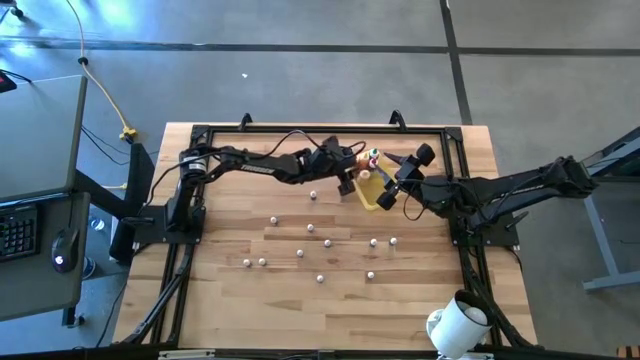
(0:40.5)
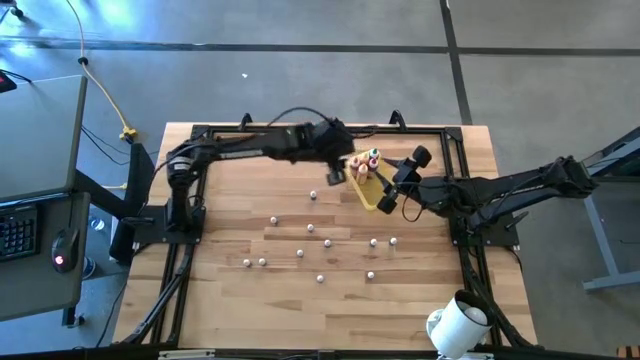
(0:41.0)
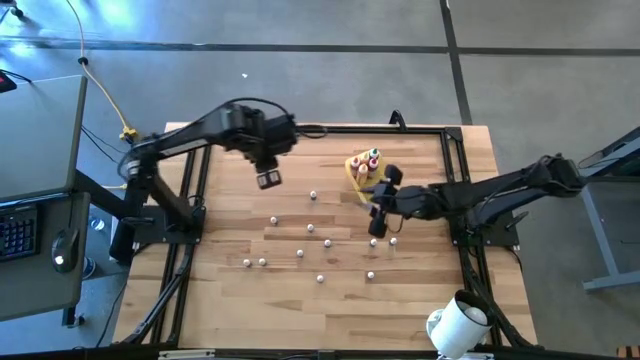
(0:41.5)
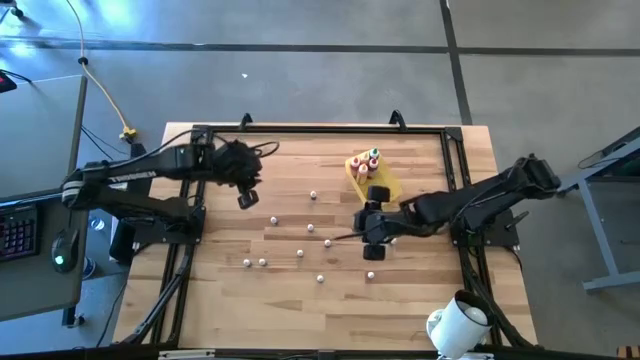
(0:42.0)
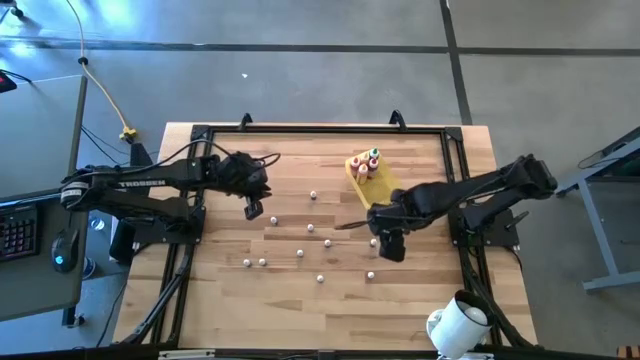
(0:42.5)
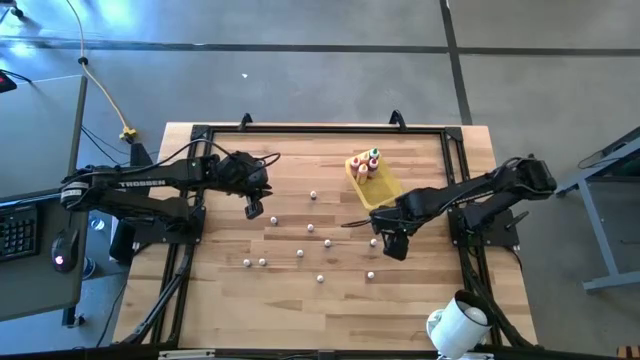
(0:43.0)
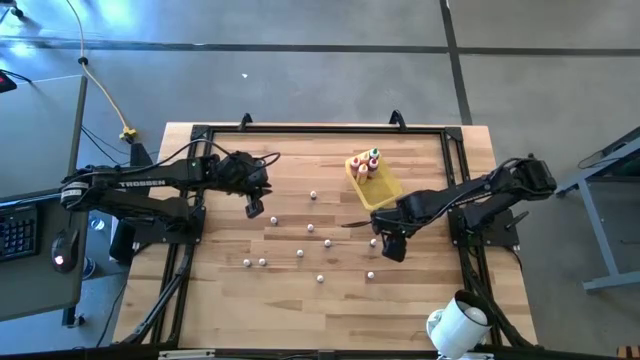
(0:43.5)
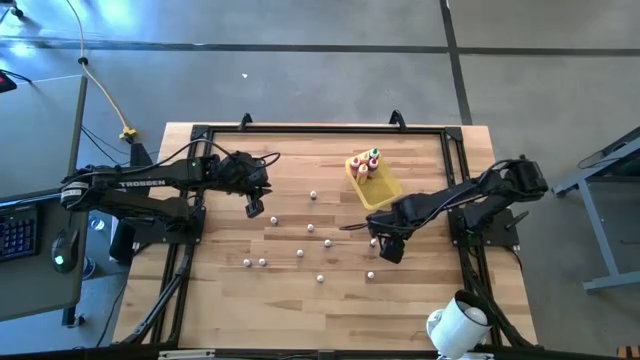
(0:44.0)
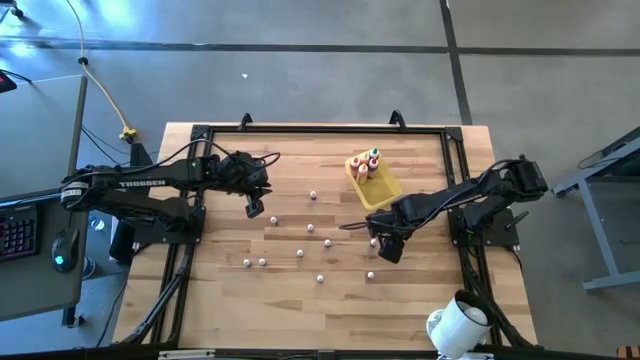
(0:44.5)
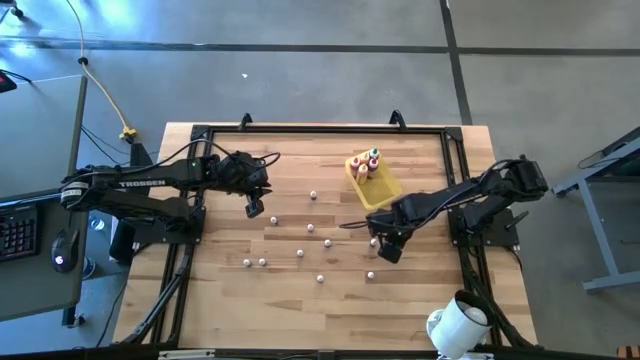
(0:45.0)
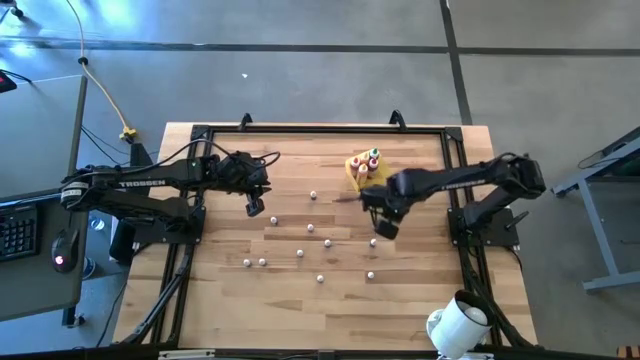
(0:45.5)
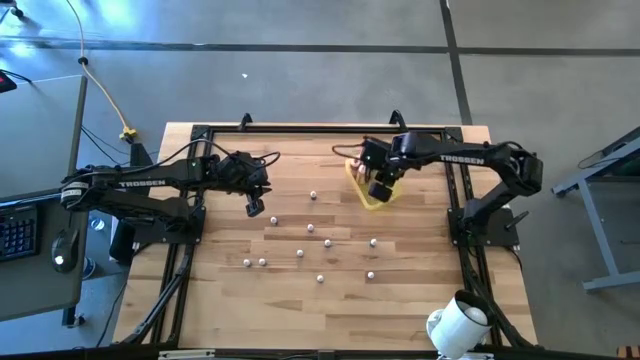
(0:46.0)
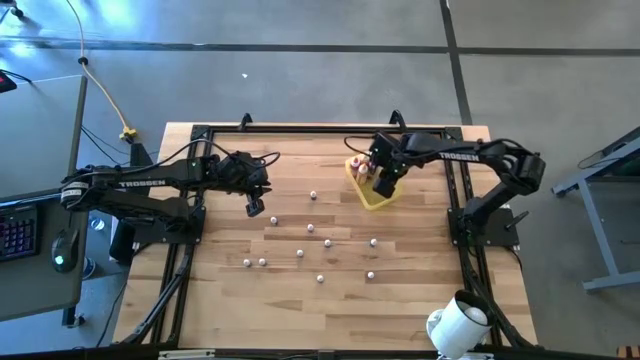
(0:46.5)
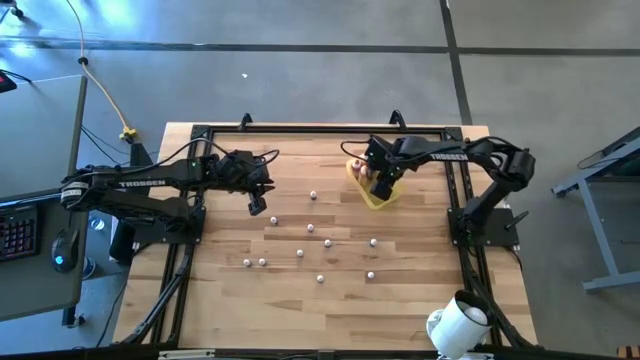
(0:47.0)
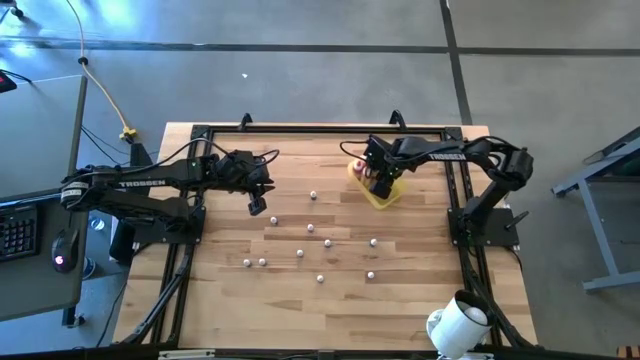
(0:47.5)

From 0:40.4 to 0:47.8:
Task: Pick & Place food coloring
Put the small green food coloring bottle into the bin

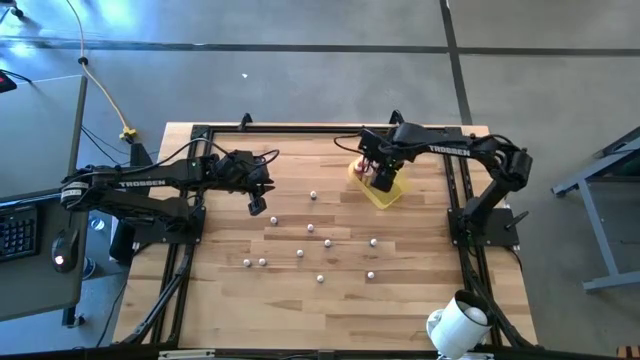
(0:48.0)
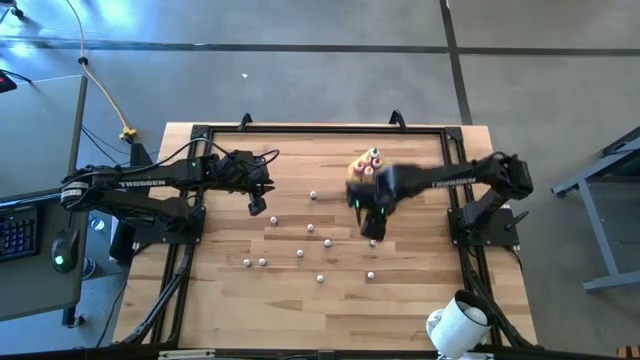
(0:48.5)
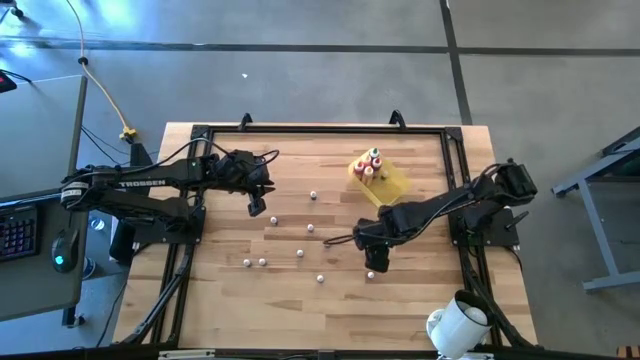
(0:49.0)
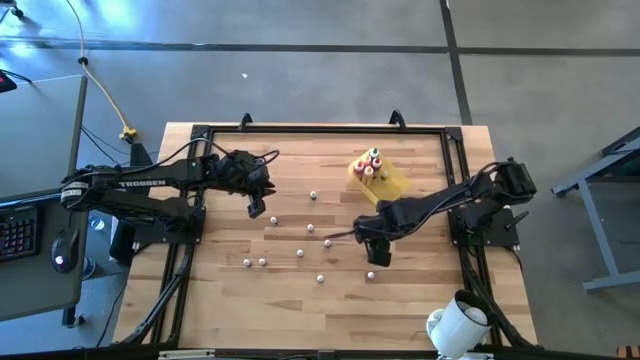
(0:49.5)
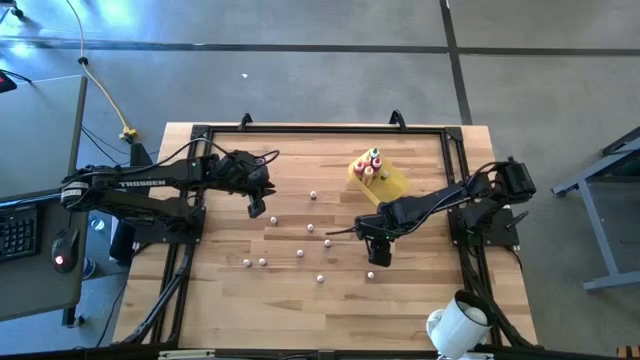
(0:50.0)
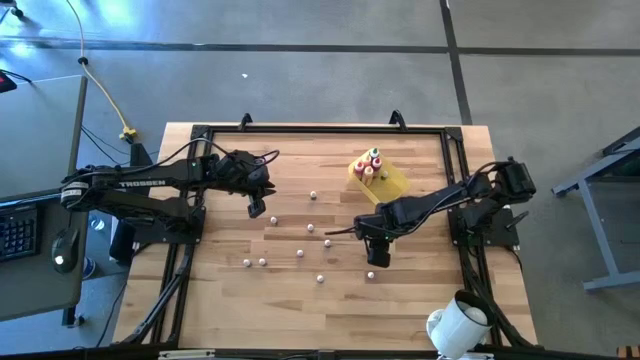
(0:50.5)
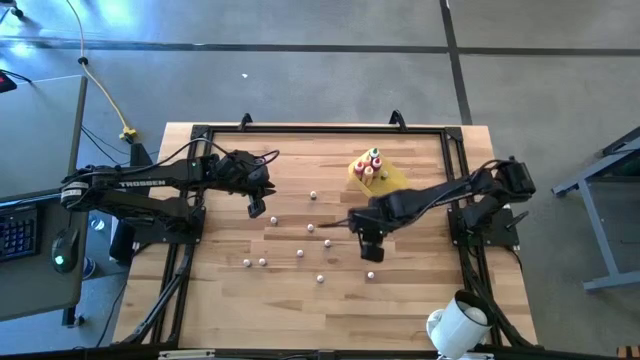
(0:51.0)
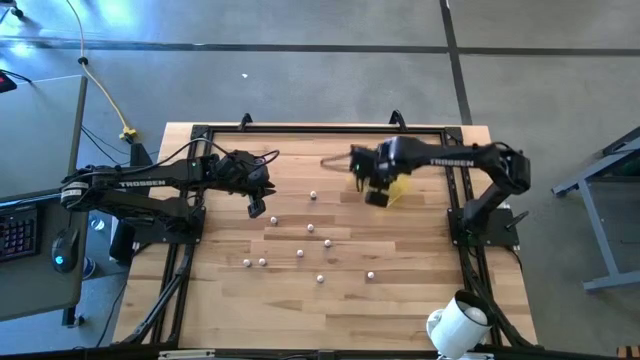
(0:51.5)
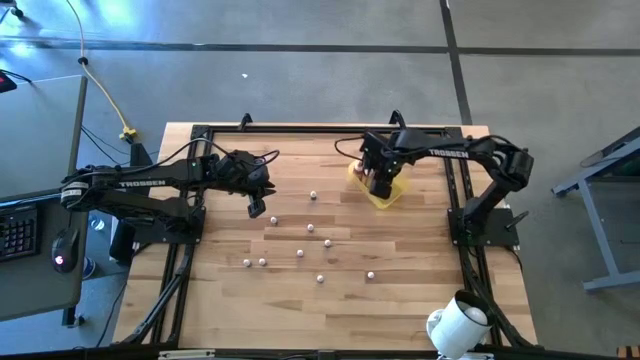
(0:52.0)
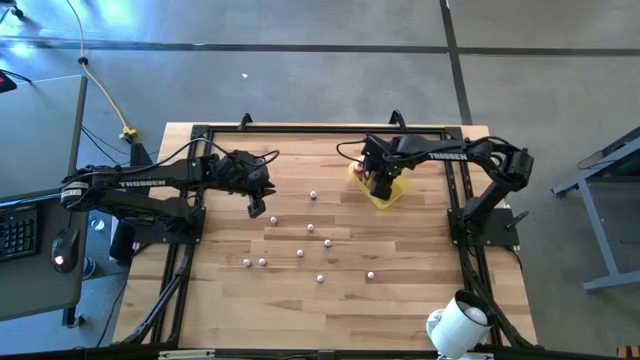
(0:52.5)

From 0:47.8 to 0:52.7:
Put the small green food coloring bottle into the bin

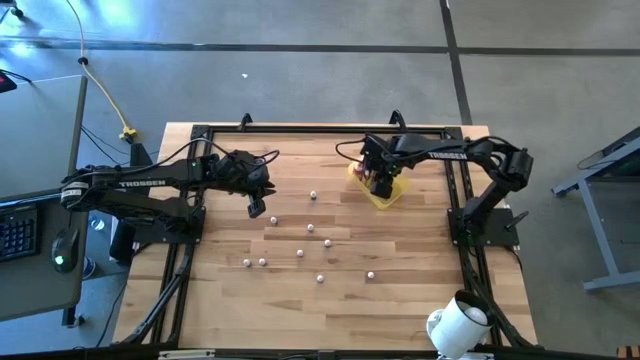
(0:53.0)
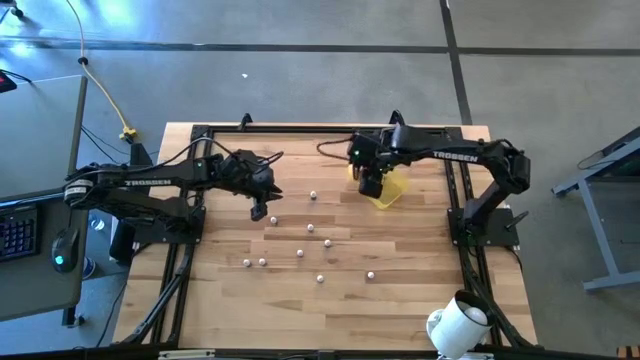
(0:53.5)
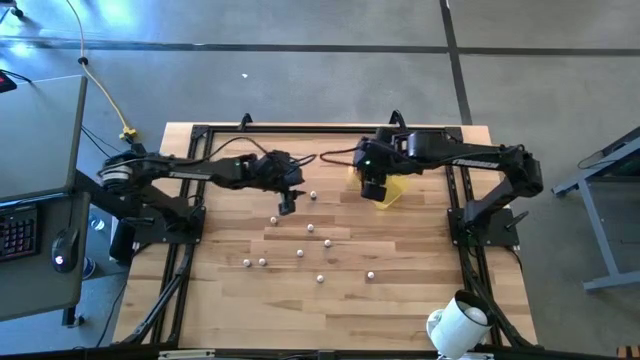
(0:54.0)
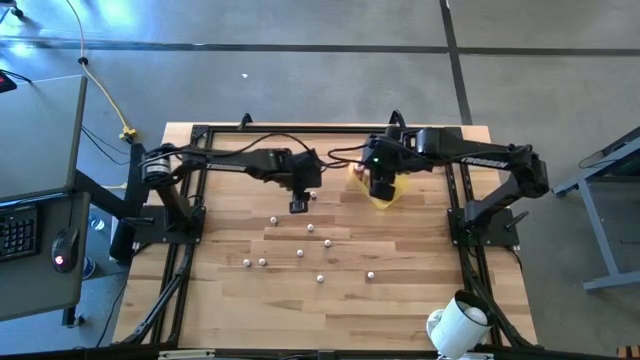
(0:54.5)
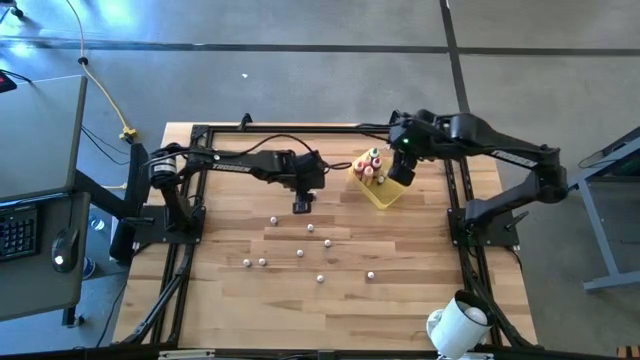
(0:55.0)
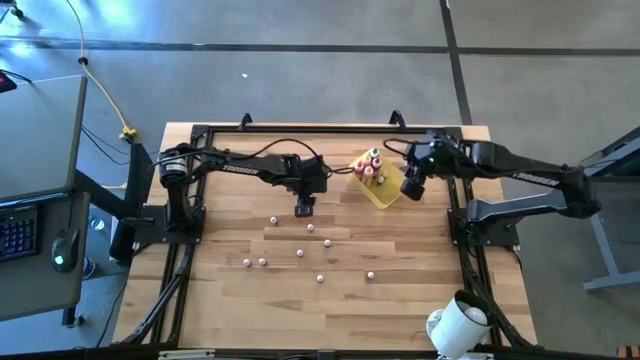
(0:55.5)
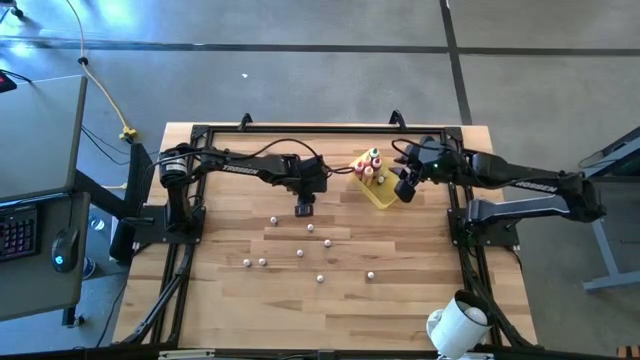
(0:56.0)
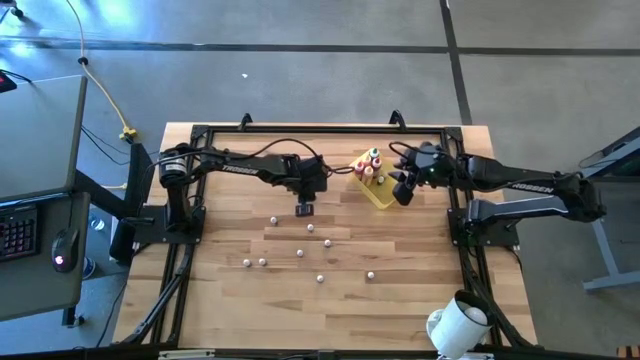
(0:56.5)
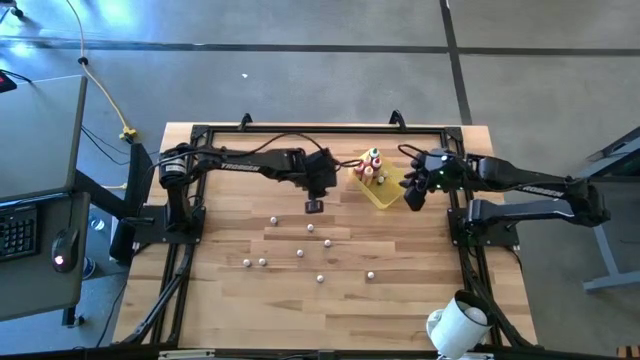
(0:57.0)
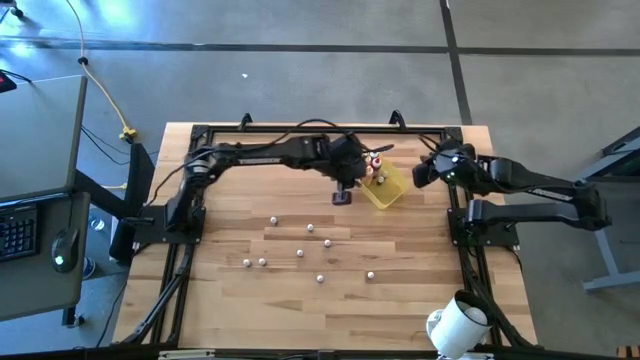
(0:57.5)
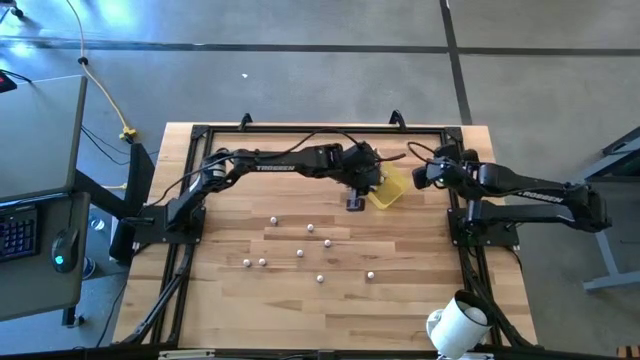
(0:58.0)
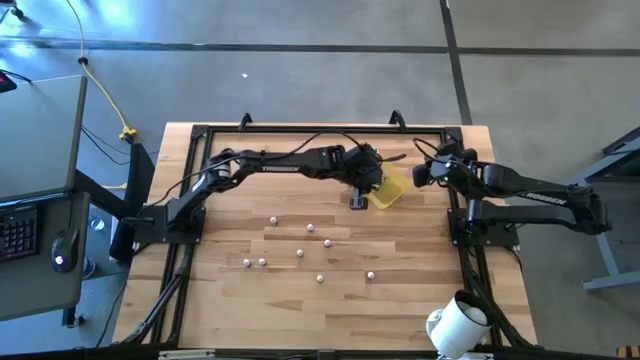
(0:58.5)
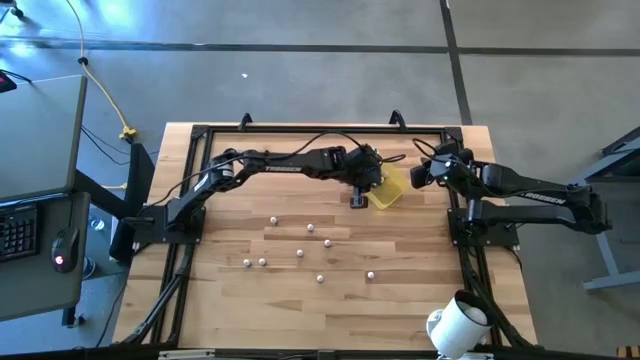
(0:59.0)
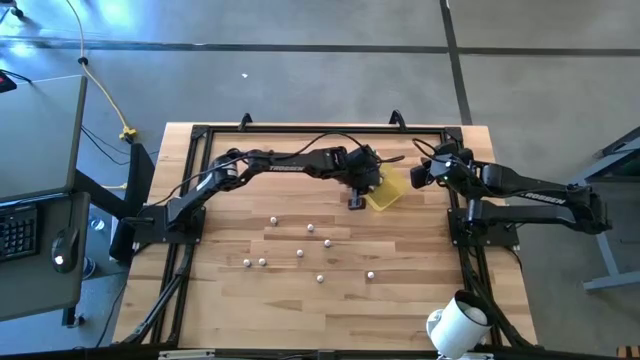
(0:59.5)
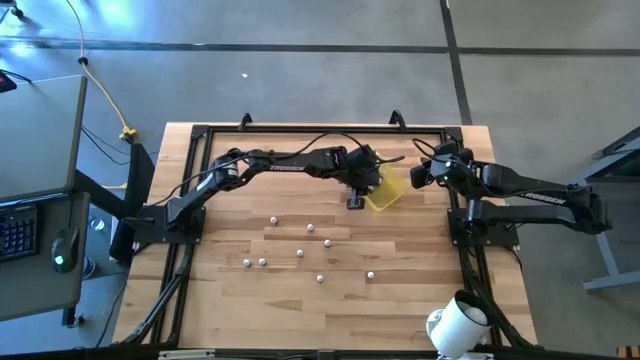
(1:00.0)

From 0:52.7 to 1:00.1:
Put the small green food coloring bottle into the bin

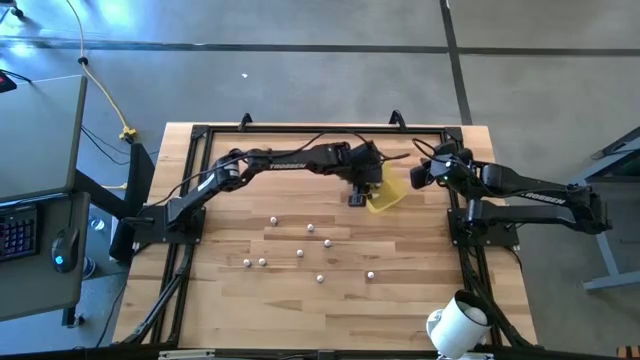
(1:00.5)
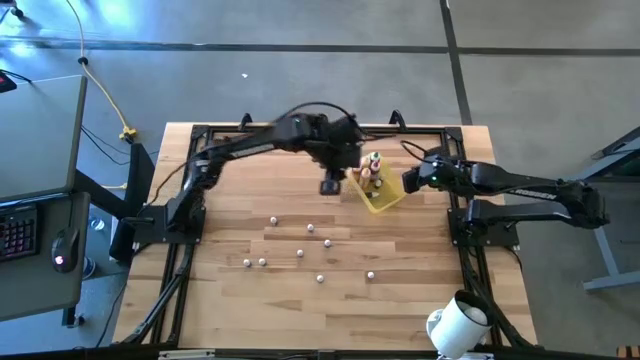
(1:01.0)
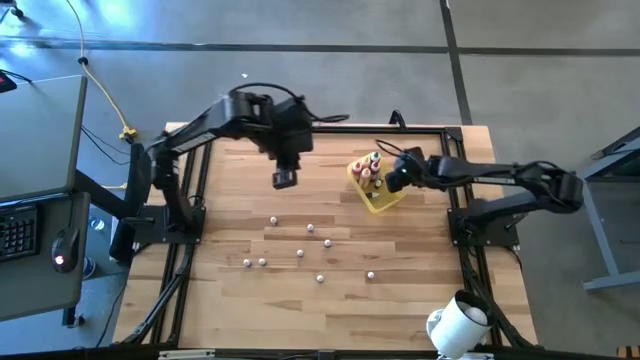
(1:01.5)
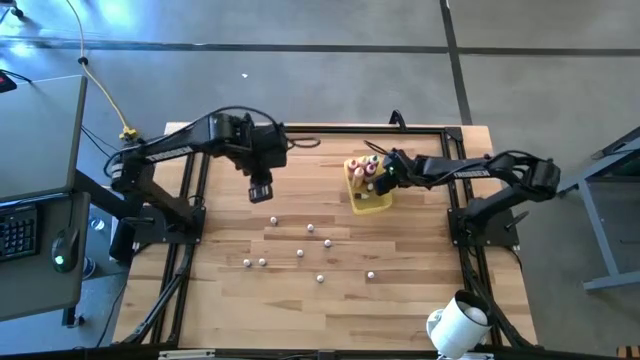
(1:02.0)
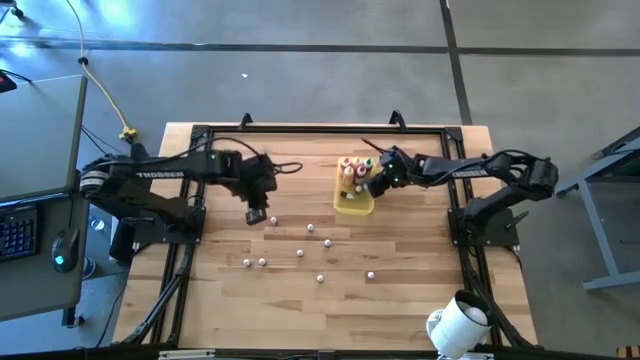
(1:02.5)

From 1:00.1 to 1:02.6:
Adjust the bin on the table
